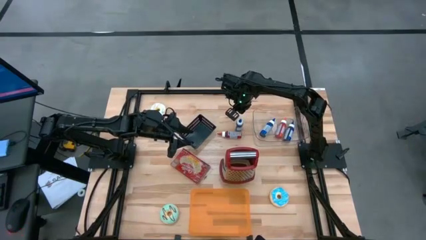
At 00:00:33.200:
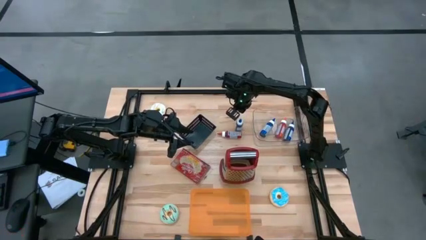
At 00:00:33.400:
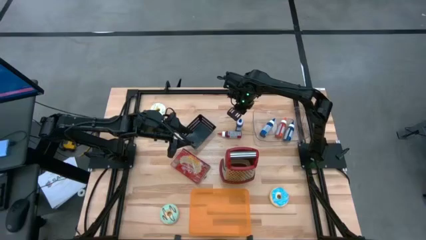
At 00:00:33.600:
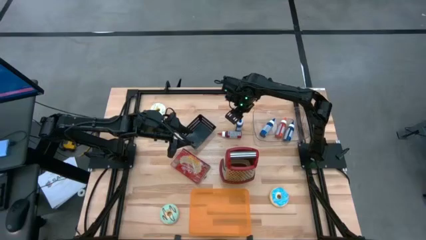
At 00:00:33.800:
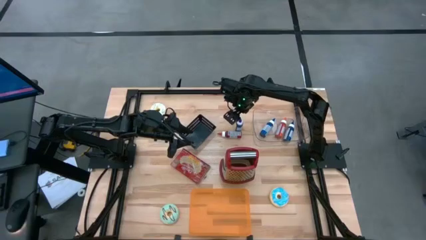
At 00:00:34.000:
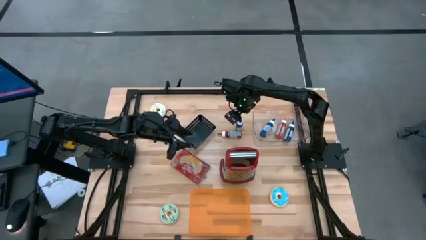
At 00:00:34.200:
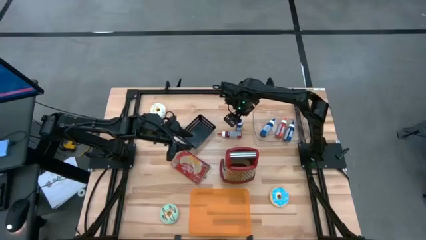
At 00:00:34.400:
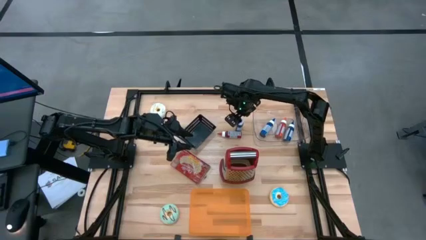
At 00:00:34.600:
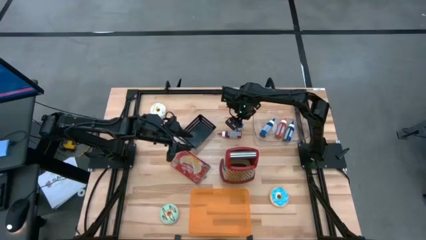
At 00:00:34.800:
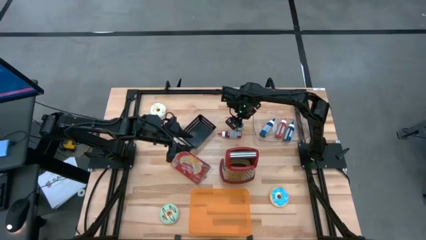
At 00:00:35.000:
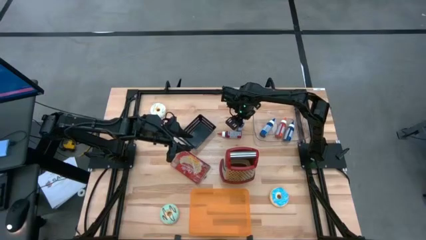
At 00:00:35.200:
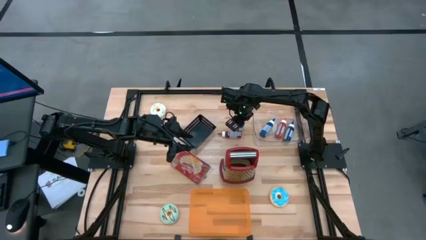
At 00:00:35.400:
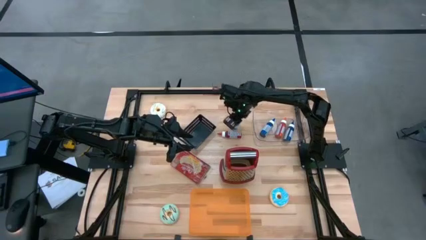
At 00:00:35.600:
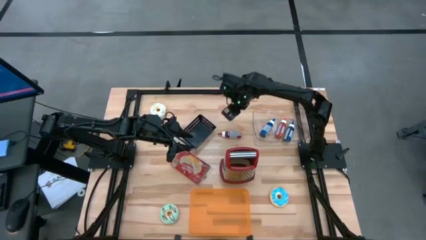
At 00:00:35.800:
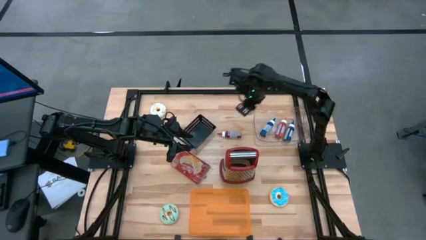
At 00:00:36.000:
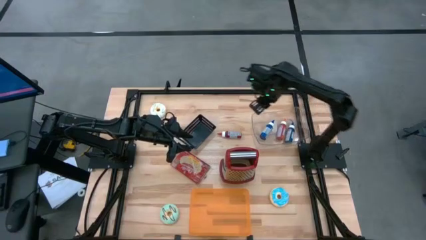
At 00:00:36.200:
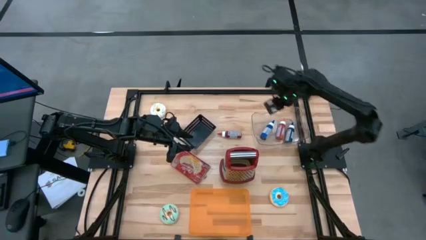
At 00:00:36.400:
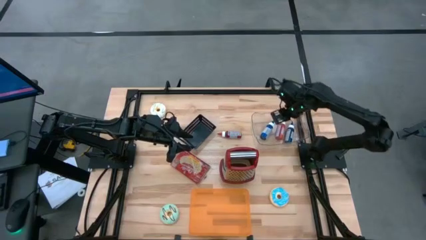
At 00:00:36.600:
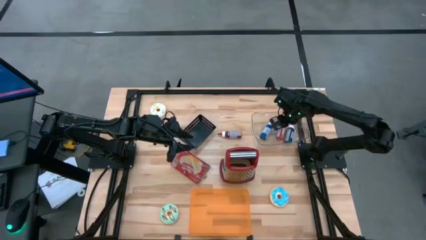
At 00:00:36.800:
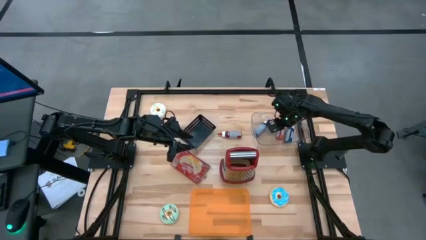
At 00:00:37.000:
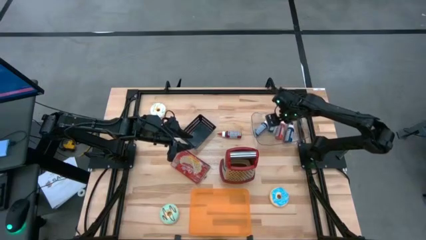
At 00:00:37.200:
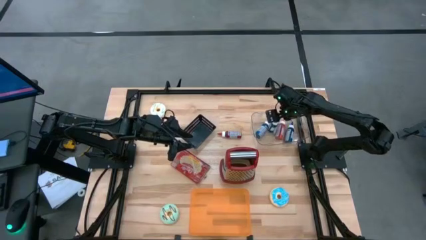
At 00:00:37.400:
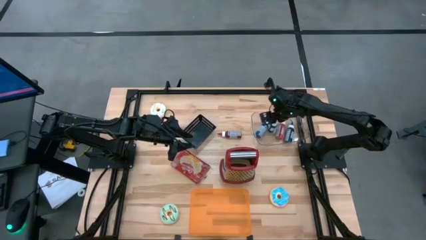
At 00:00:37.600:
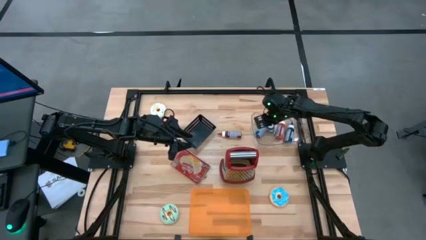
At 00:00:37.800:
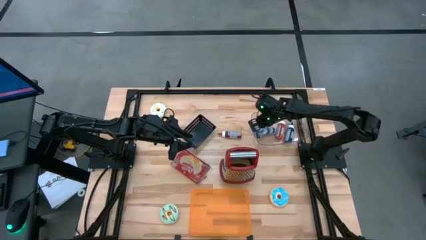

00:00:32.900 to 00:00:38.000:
Put the blue food coloring bottle into the transparent bin

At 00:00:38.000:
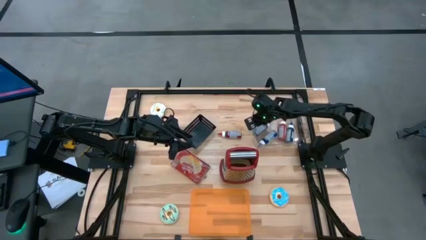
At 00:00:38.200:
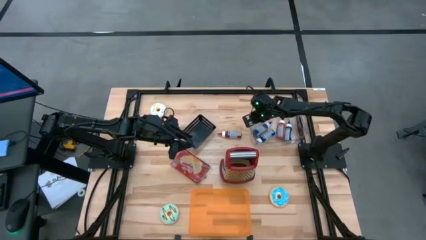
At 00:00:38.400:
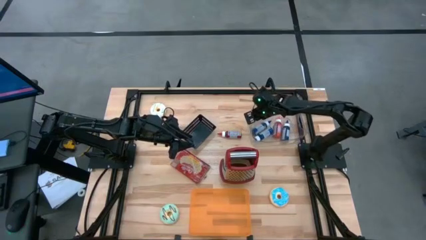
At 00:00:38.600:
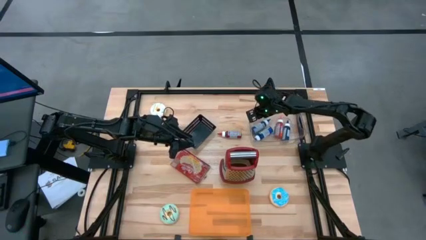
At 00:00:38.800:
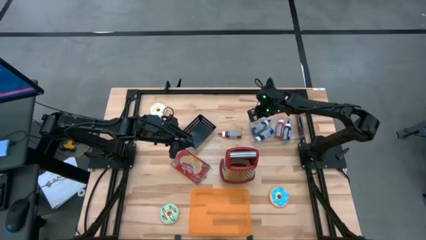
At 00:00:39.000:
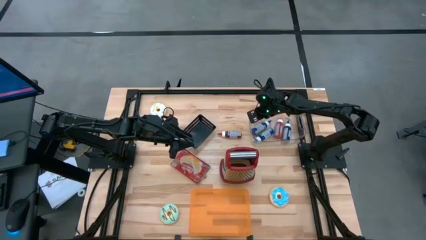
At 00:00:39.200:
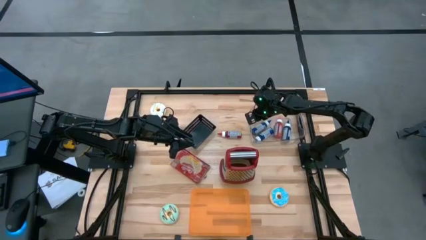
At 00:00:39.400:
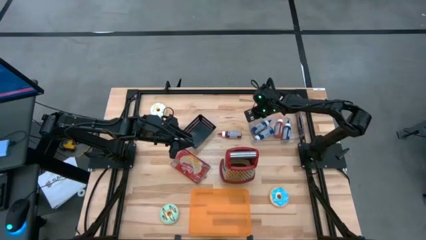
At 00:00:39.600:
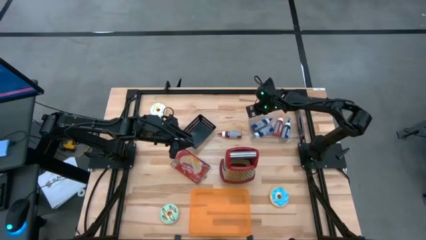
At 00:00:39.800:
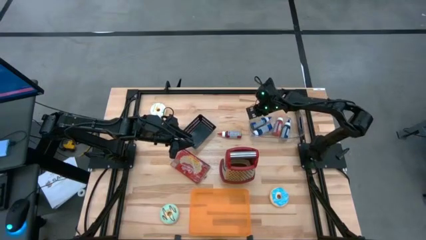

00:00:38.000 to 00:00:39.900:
Adjust the transparent bin on the table

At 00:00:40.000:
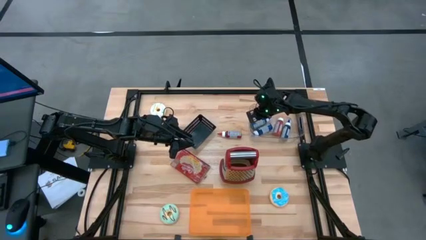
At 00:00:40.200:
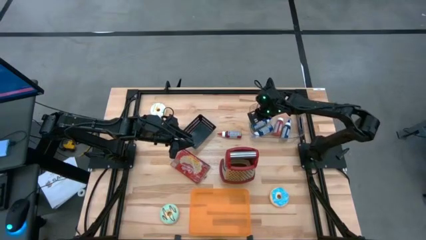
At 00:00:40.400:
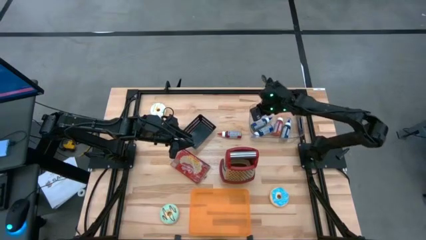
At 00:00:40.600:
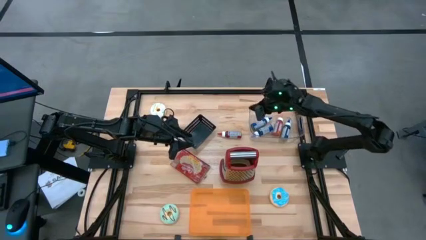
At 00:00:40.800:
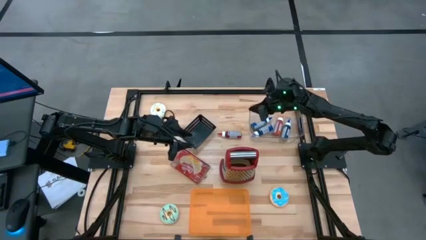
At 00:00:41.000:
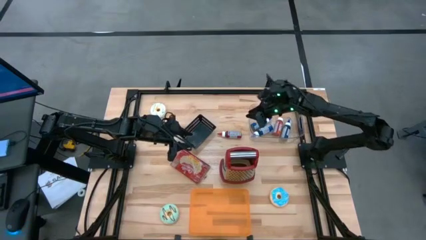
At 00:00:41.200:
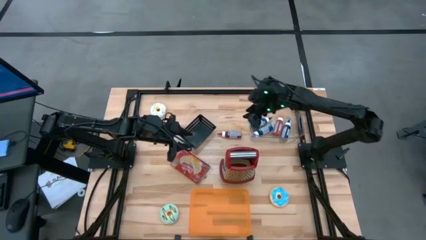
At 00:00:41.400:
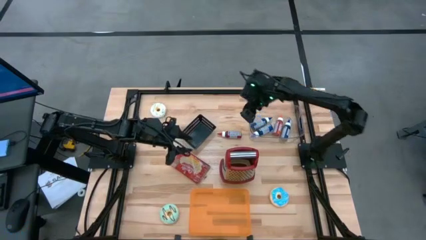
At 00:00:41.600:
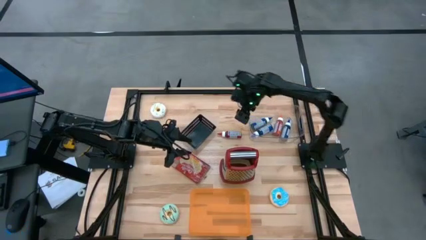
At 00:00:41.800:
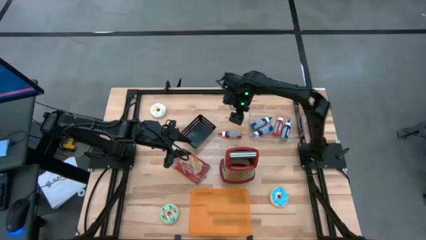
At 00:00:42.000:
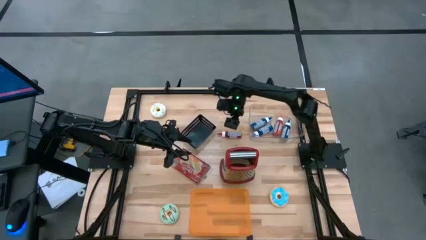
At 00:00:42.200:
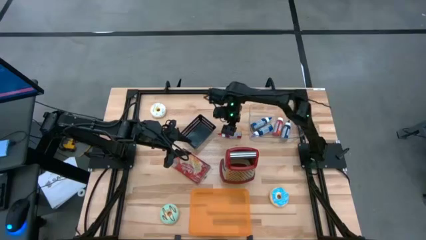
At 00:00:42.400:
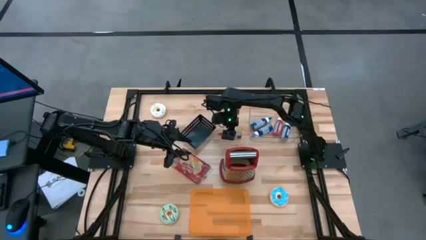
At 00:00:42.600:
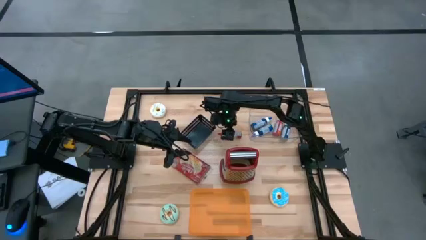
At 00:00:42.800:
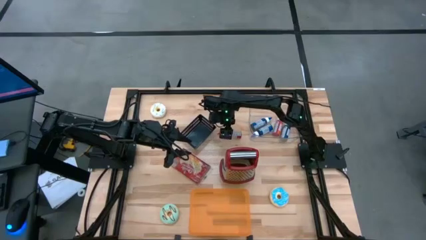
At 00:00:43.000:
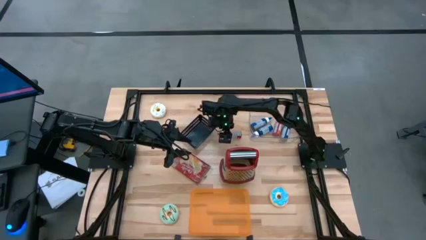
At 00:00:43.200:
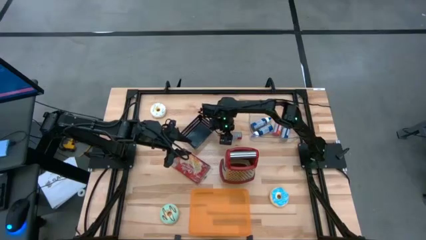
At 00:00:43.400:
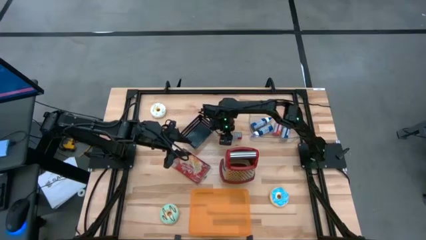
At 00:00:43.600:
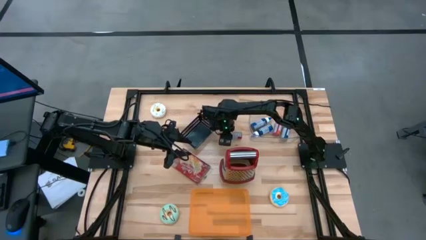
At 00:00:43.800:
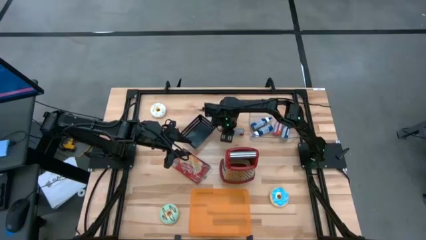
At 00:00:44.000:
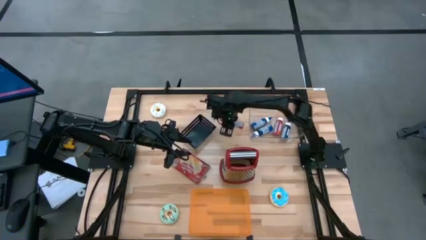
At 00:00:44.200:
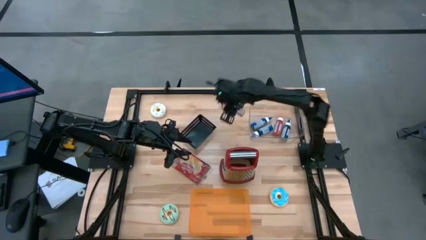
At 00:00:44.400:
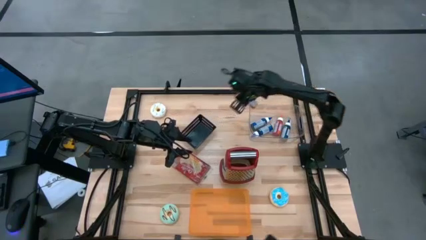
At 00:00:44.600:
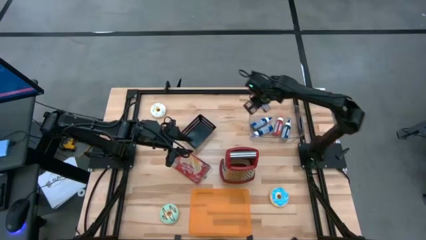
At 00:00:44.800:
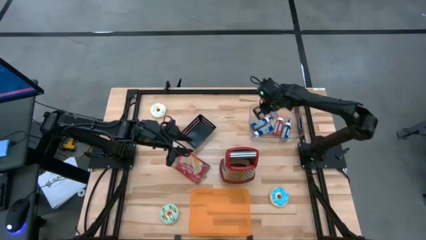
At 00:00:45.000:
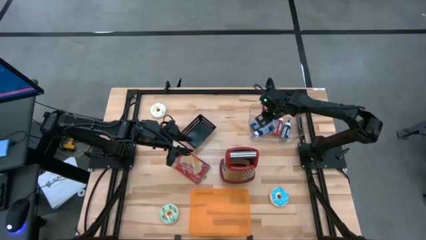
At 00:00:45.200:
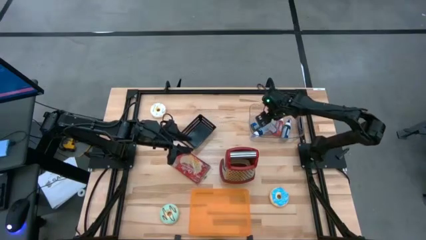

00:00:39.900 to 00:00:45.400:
Put the red food coloring bottle into the transparent bin

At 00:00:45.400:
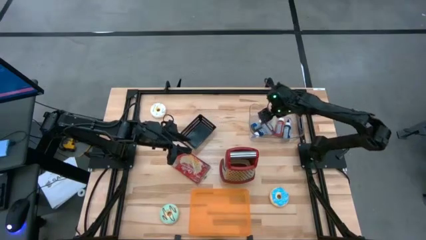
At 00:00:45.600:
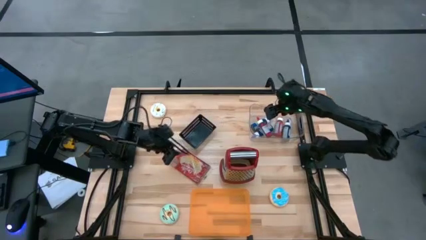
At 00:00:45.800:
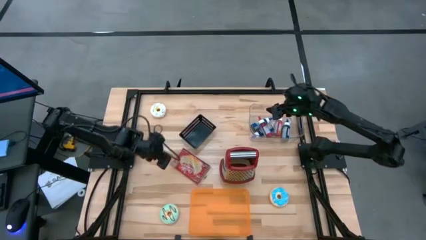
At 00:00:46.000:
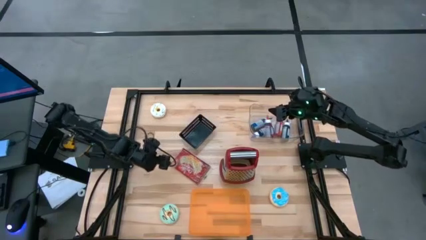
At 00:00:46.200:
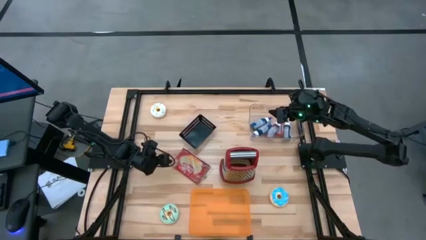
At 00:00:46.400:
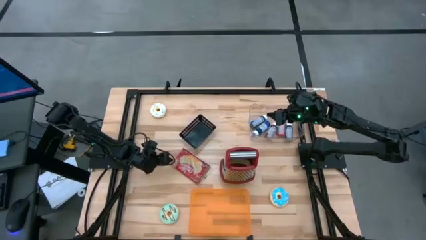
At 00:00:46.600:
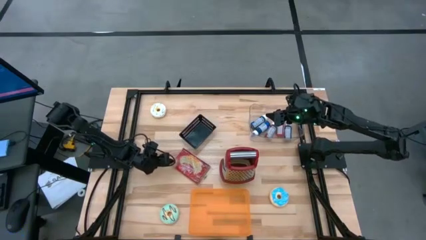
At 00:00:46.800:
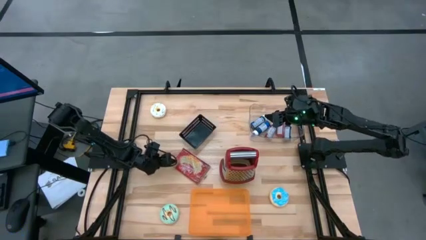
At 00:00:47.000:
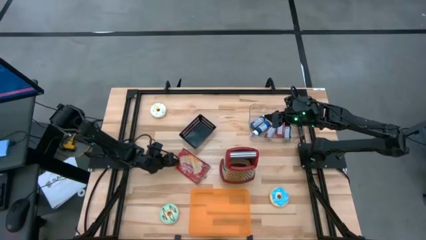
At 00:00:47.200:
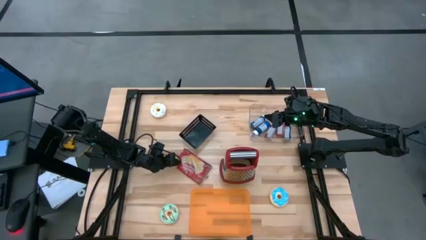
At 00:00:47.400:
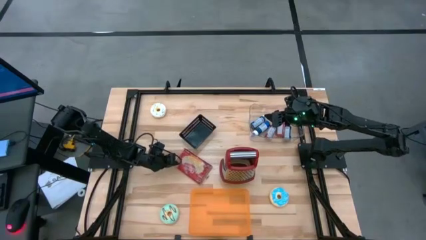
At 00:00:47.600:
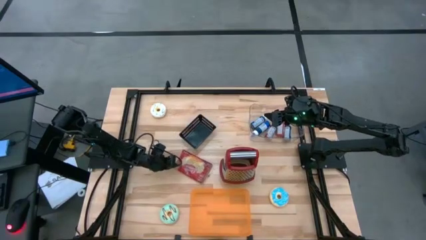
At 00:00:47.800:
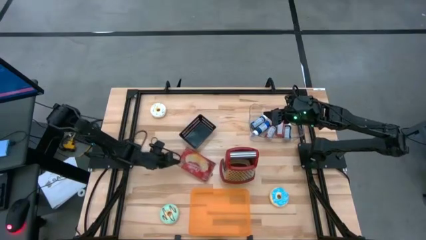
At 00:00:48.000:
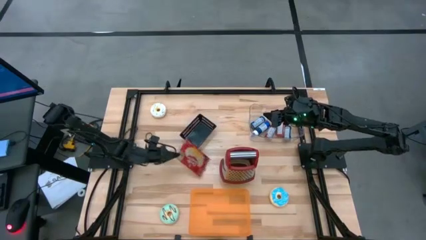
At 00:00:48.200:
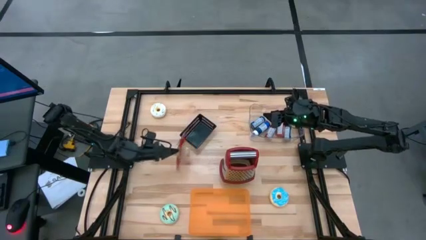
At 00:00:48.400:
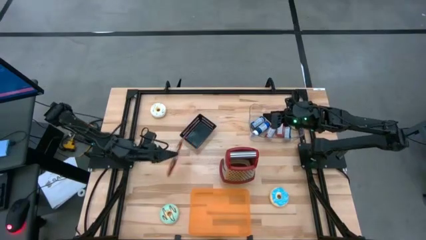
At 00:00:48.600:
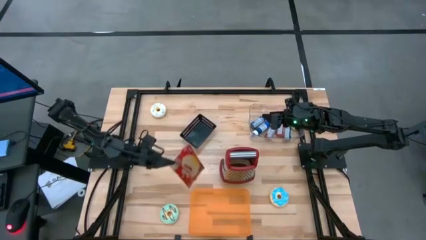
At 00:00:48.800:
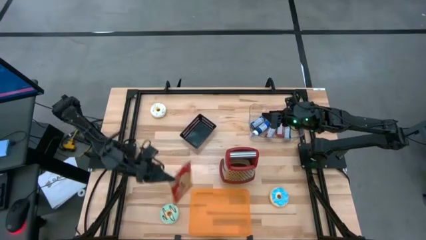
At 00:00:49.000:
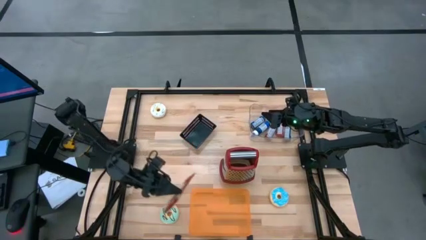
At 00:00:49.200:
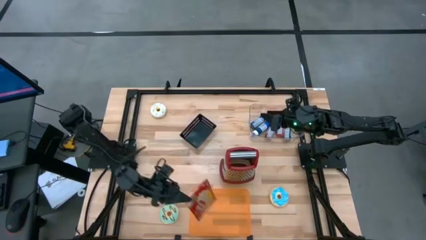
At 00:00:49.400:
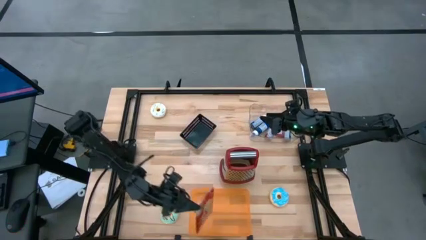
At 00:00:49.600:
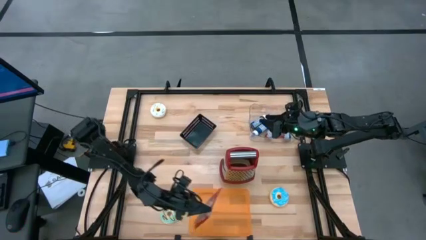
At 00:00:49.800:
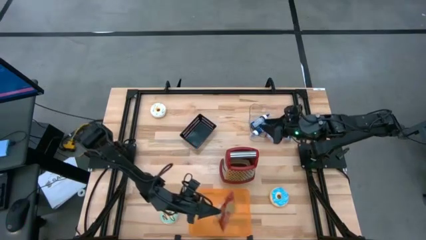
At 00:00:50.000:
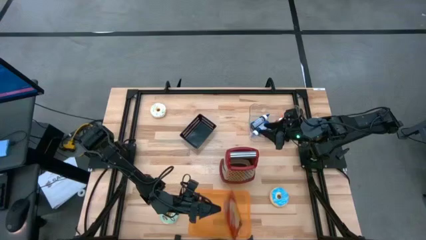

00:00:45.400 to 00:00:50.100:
Put the red popcorn bag into the orange bin
